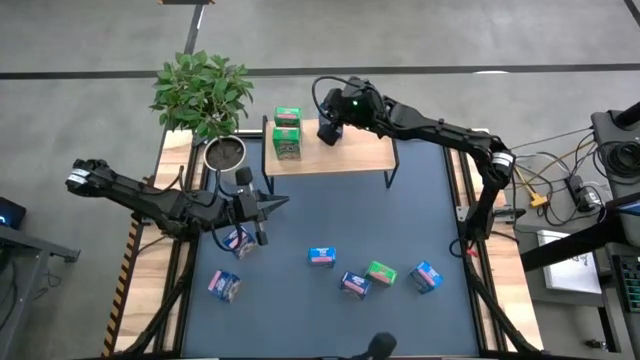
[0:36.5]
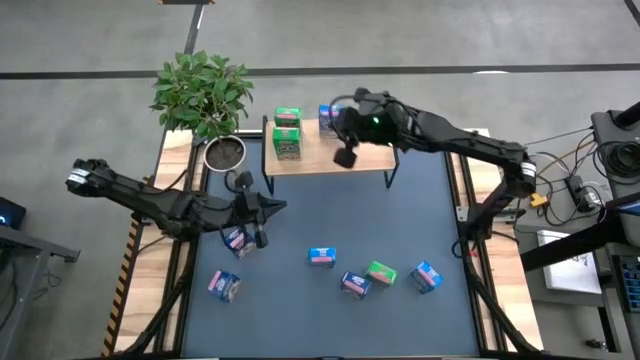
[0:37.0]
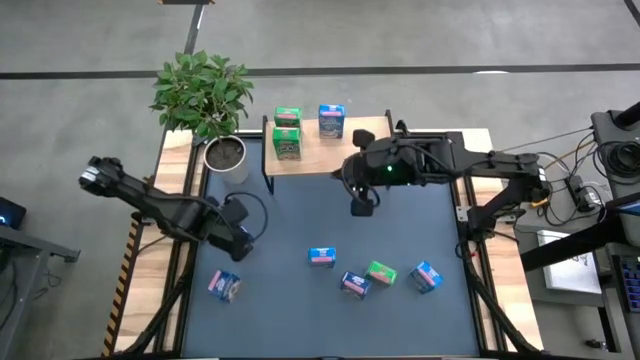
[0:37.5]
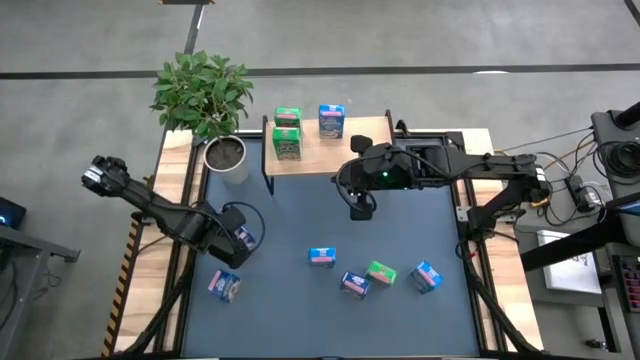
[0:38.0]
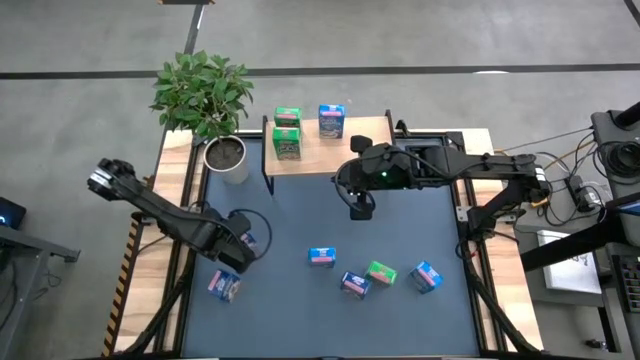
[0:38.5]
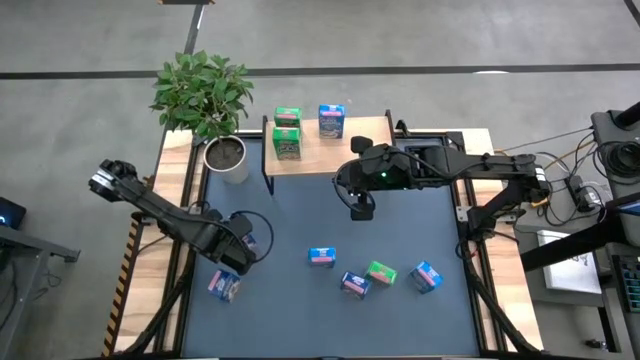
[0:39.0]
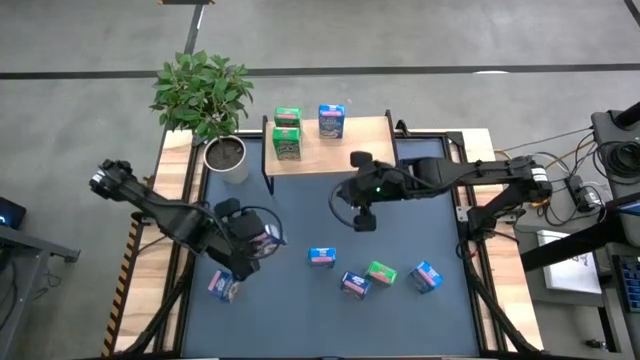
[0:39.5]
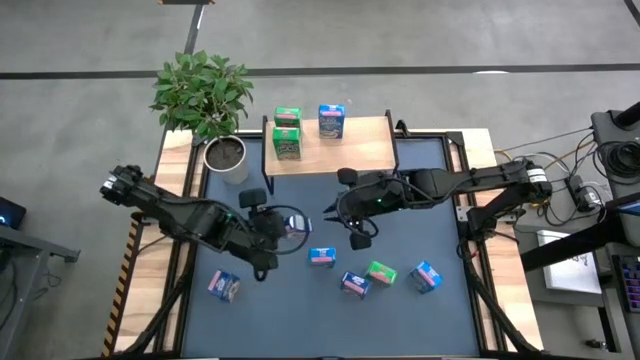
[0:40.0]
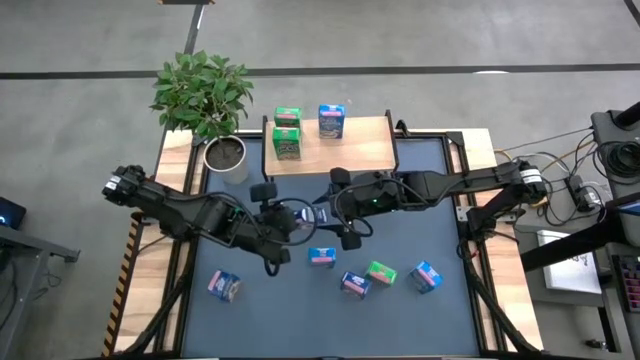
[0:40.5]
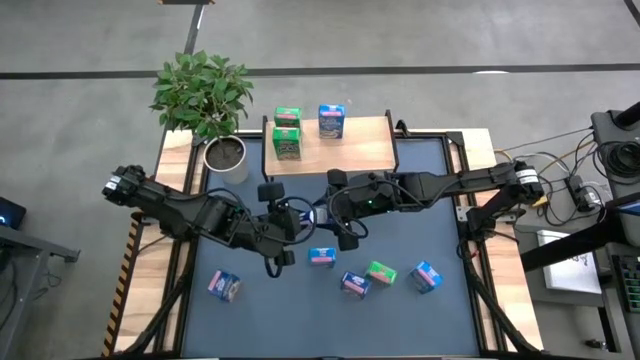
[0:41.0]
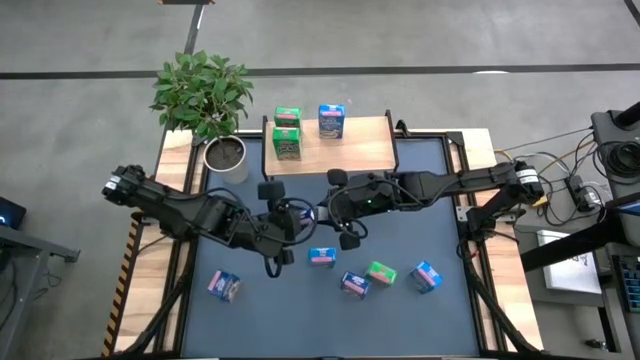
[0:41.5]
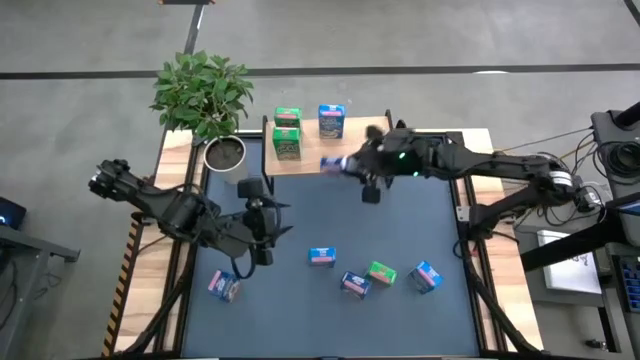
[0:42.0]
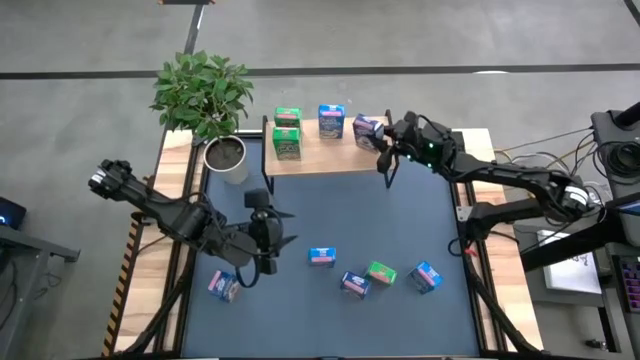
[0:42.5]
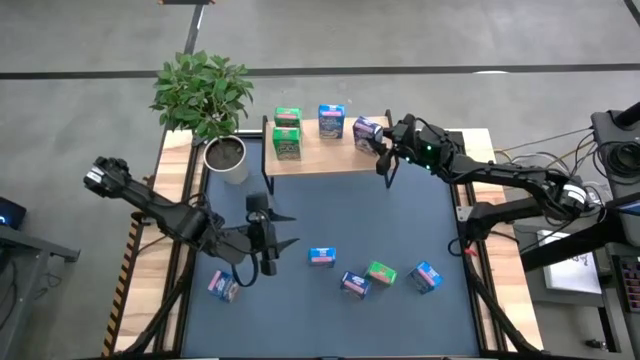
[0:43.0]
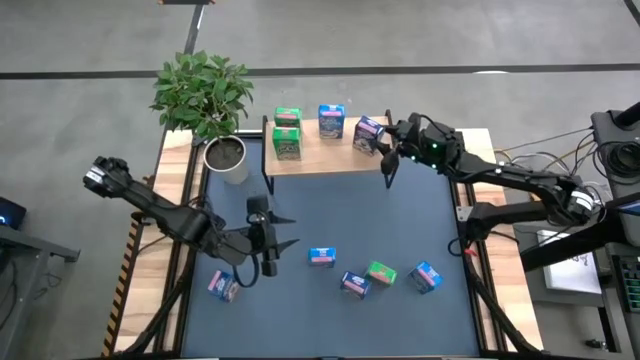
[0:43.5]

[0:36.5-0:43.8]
Task: Stack cereal on shelf
Put the top left blue cereal box on the shelf

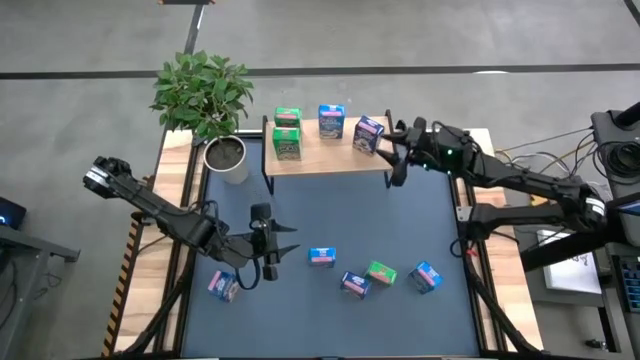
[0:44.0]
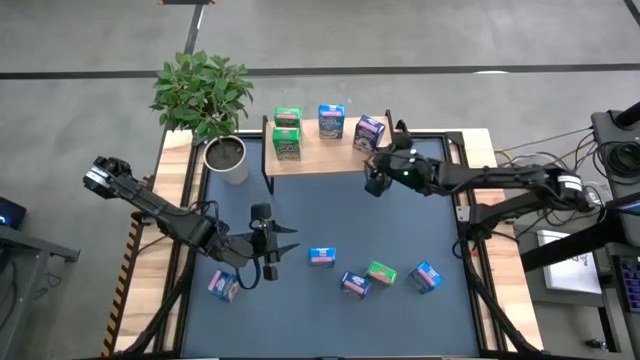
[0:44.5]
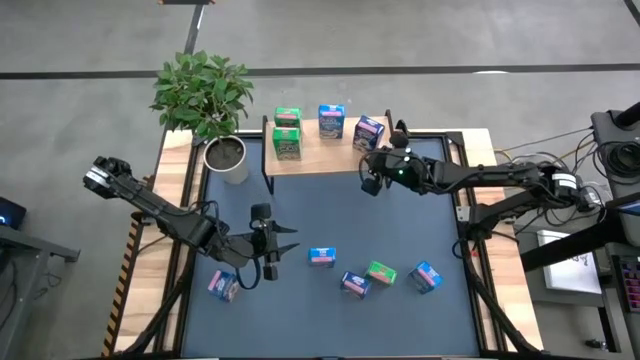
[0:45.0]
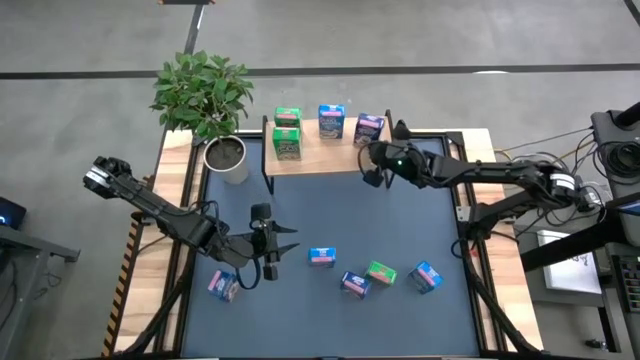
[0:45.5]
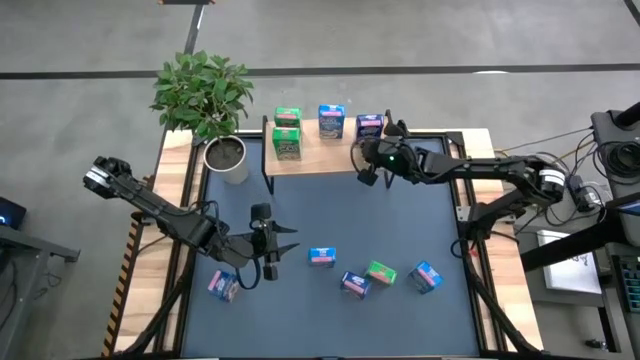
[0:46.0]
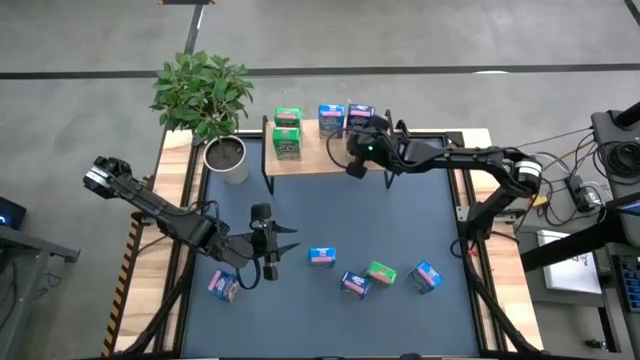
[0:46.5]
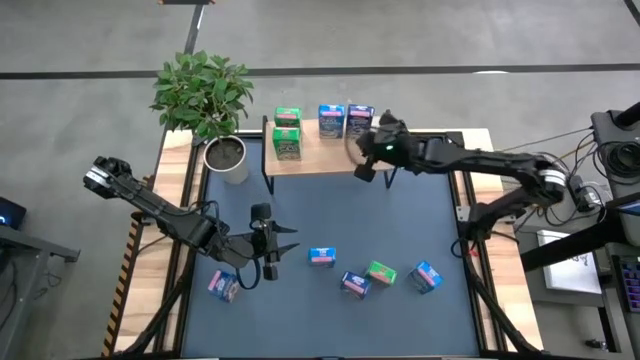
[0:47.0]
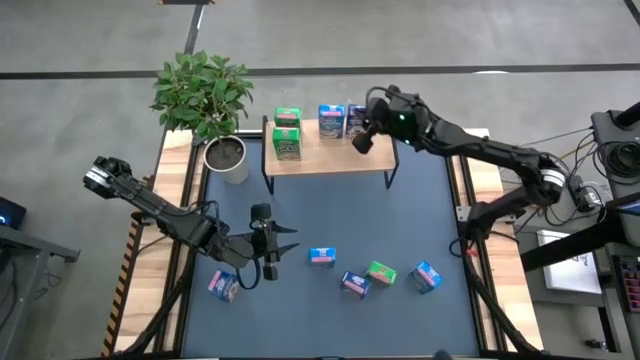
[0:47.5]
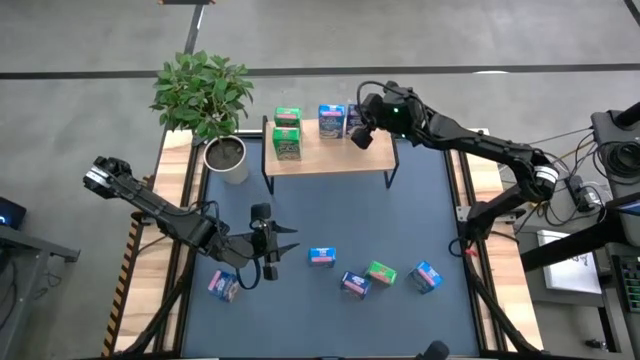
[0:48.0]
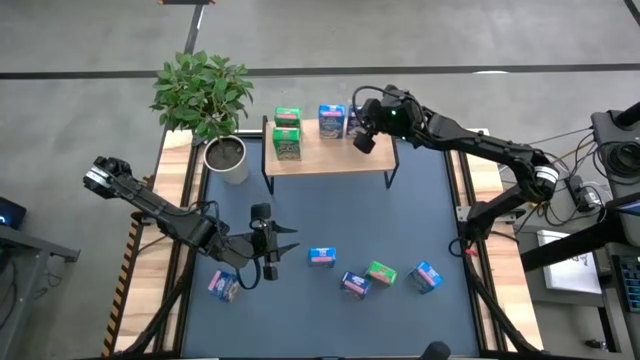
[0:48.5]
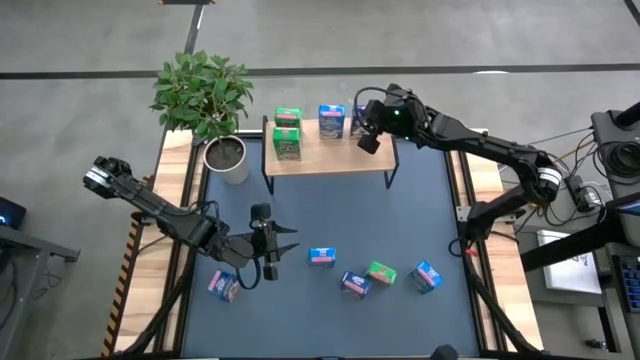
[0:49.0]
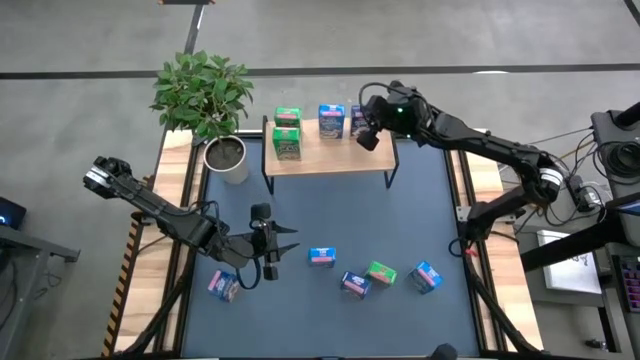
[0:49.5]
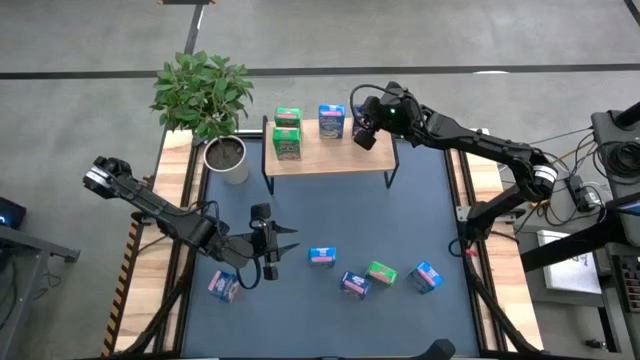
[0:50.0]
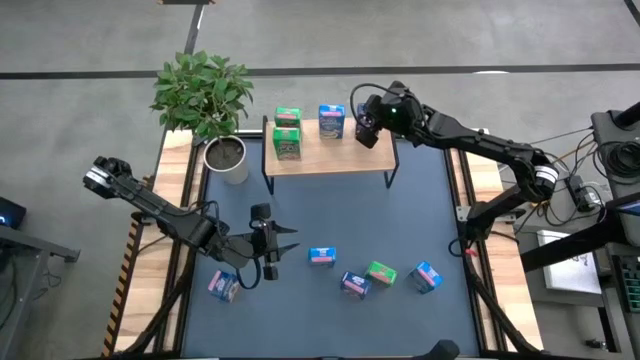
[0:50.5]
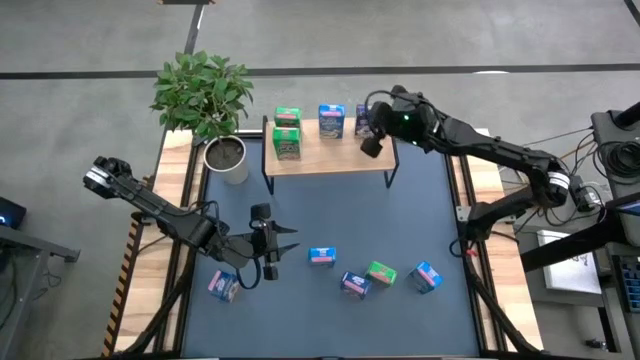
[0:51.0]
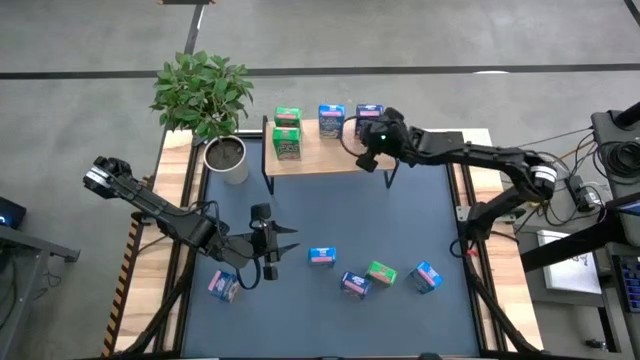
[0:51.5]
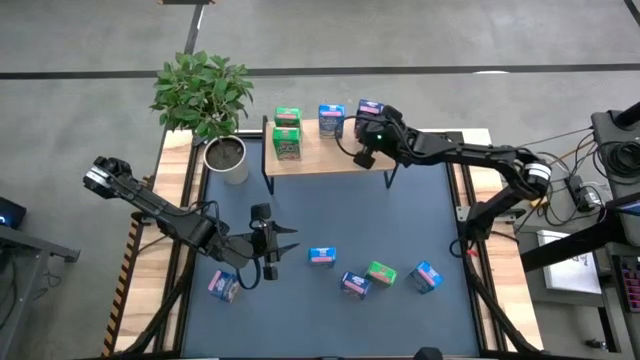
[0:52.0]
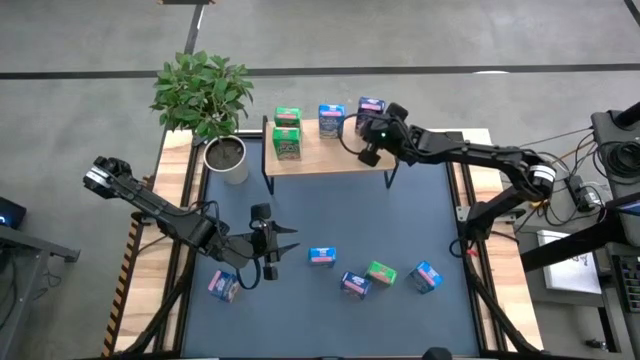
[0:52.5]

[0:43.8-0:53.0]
Adjust the blue cereal box on the shelf

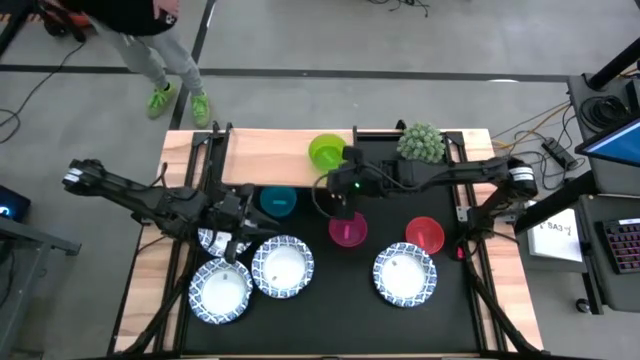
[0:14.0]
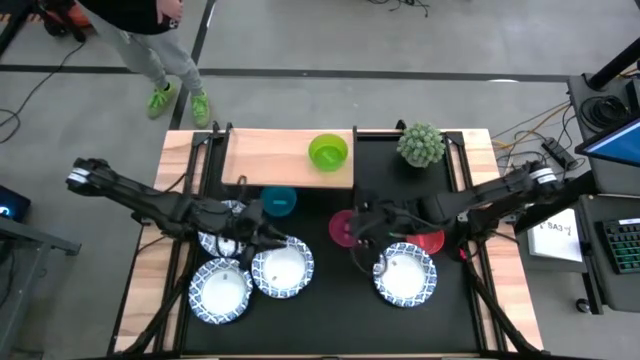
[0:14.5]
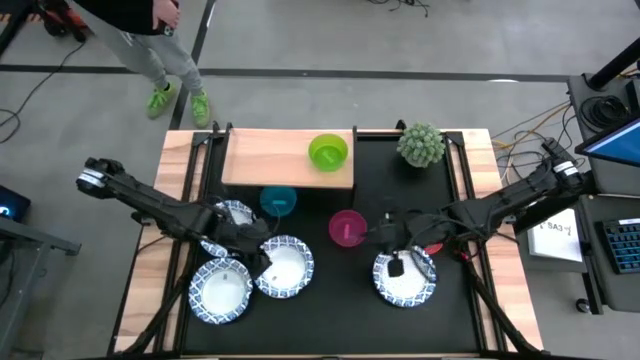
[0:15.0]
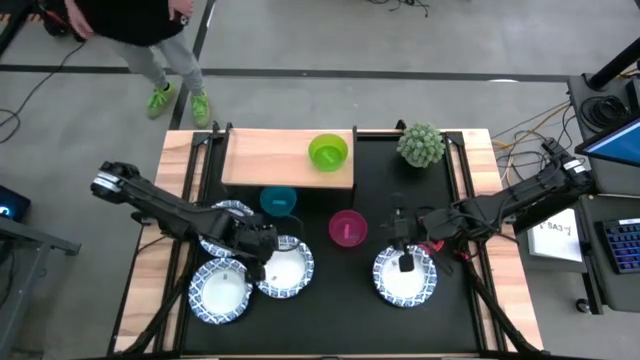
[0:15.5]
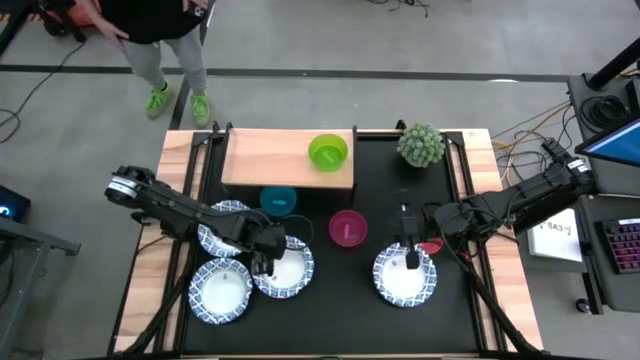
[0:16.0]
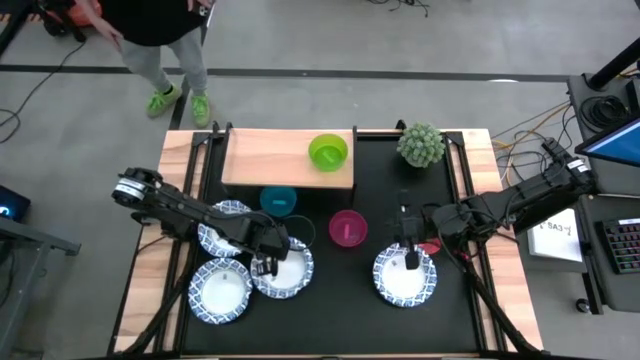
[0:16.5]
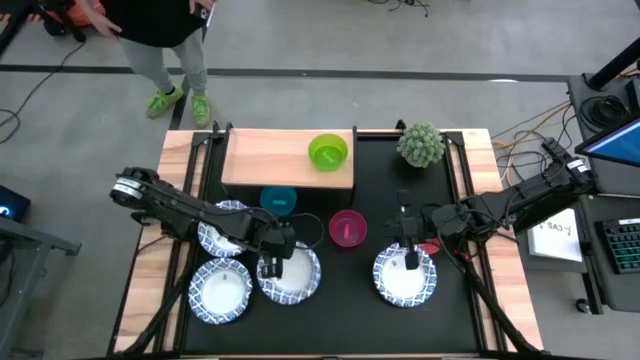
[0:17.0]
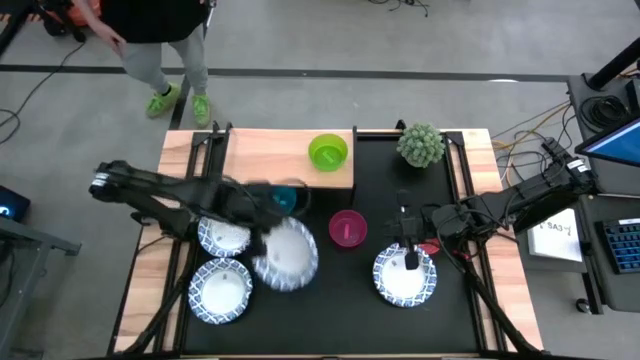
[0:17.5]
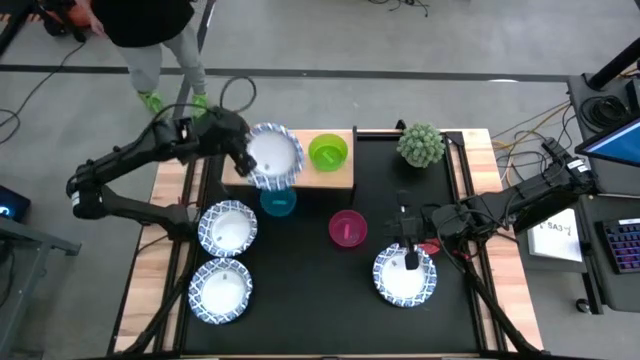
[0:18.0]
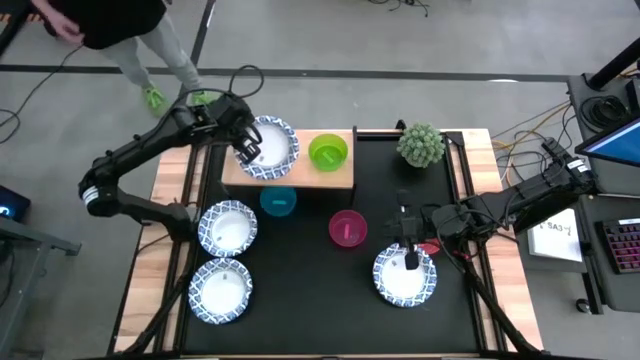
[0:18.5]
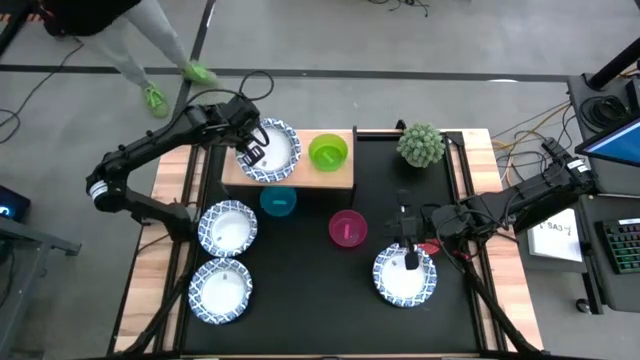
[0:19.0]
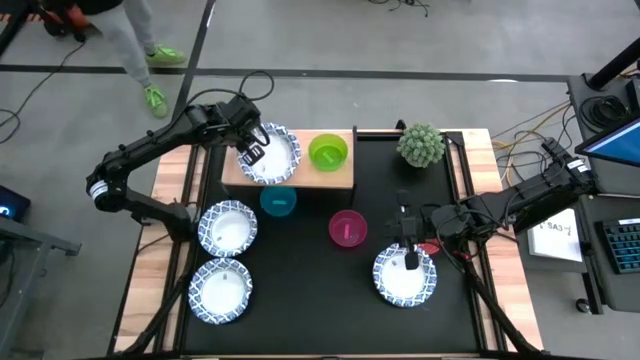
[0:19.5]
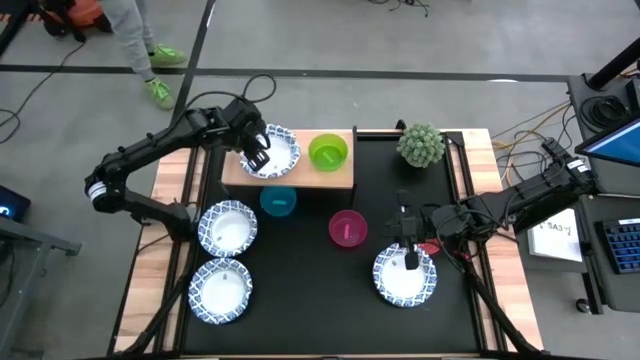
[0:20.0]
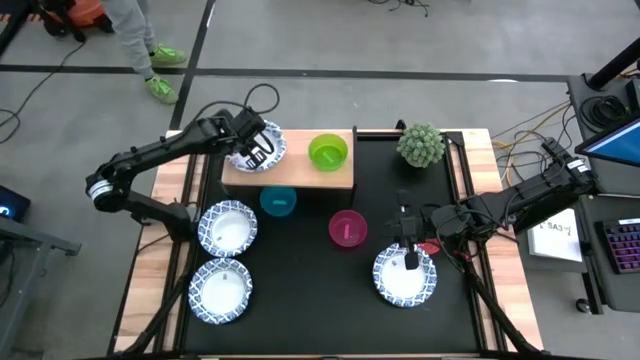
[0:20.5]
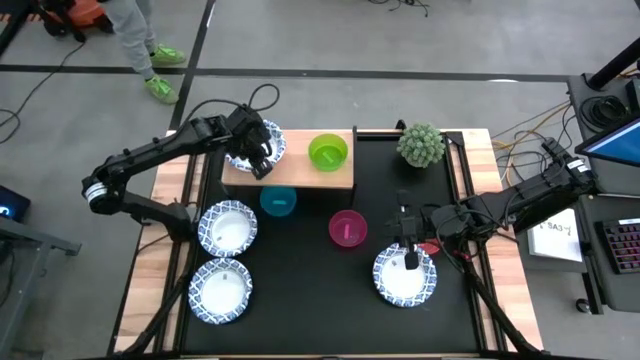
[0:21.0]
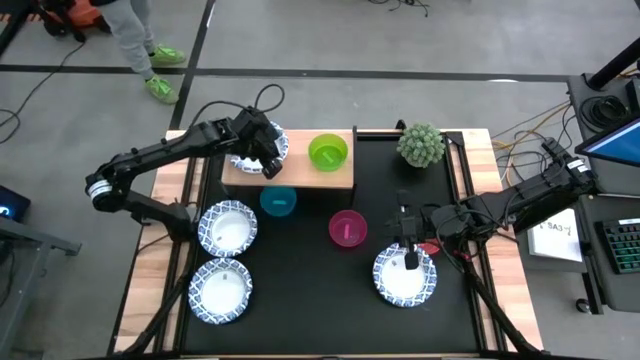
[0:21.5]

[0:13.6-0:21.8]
Task: Place and stack bowls onto a shelf
Put the white bowl on the shelf
